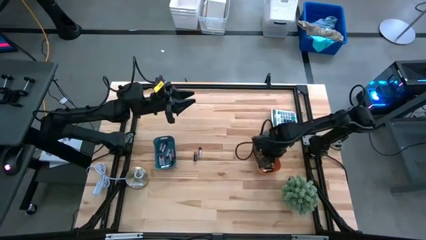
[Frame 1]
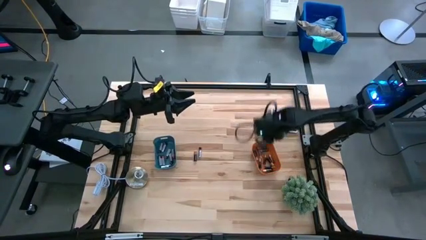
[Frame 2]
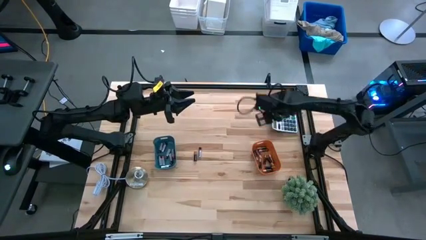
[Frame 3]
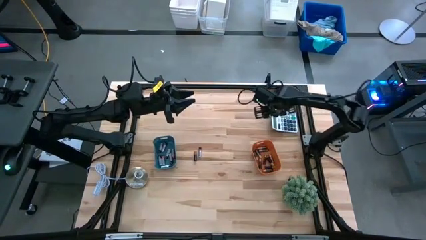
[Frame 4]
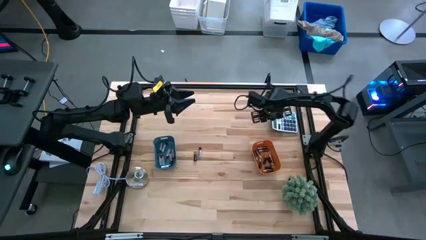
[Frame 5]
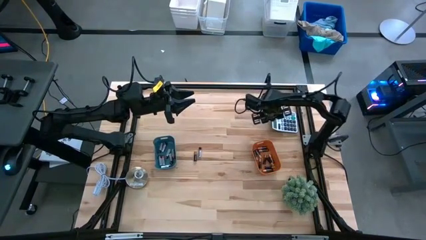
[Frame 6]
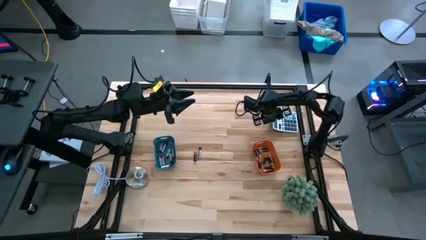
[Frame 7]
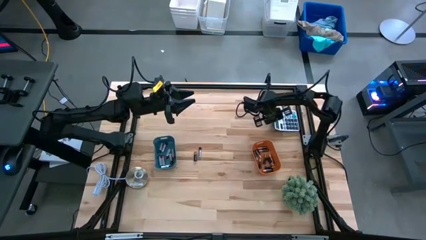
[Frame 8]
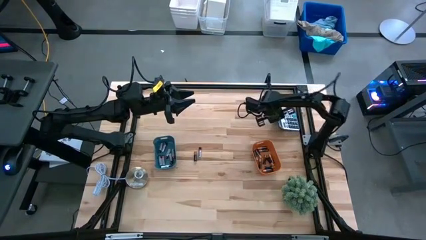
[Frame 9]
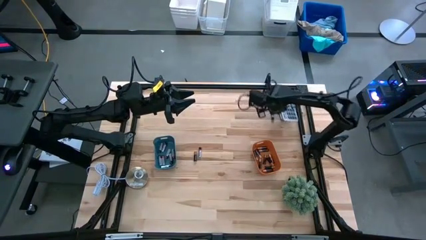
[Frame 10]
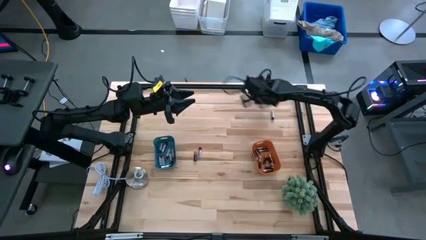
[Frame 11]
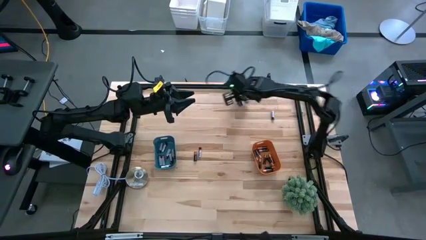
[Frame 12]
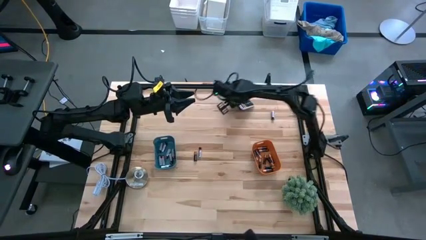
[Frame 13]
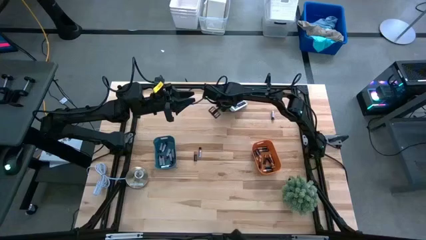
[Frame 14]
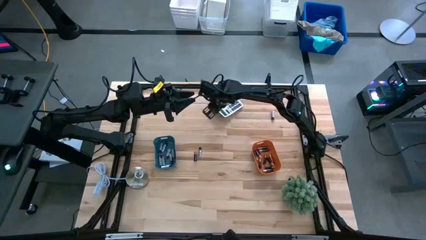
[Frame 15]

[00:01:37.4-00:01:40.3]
Task: Sort batteries
Move the calculator to the top center of the table

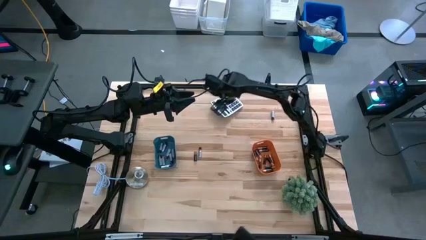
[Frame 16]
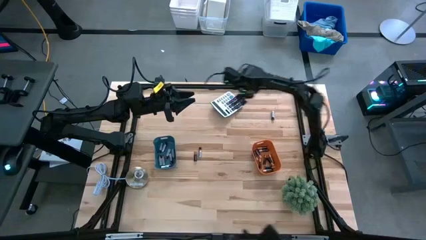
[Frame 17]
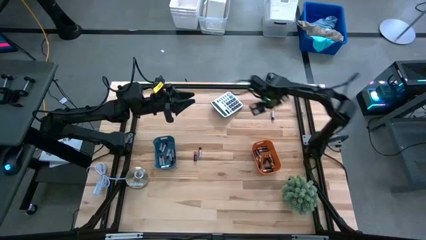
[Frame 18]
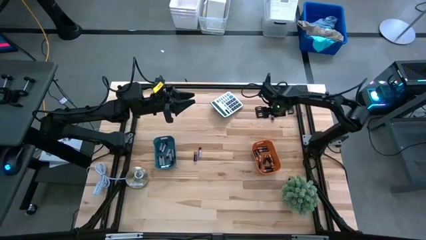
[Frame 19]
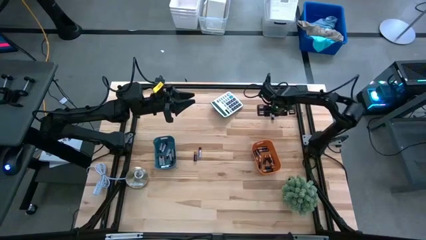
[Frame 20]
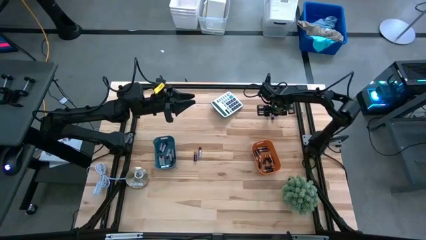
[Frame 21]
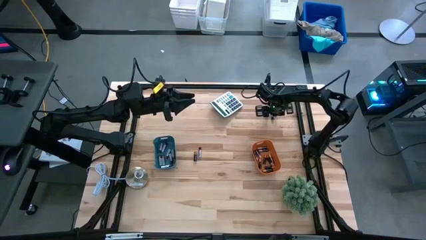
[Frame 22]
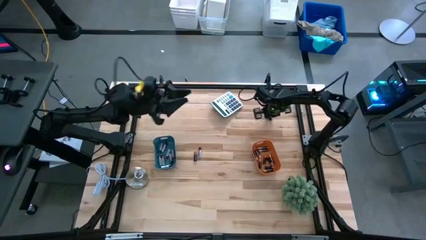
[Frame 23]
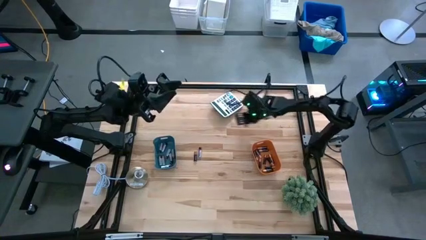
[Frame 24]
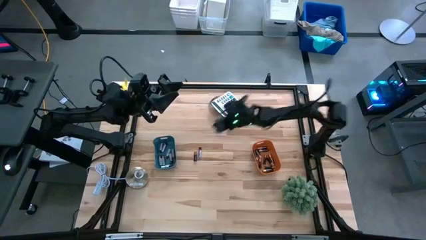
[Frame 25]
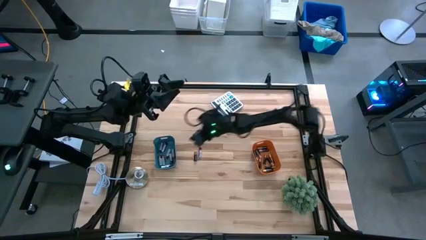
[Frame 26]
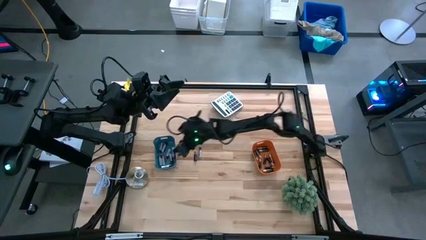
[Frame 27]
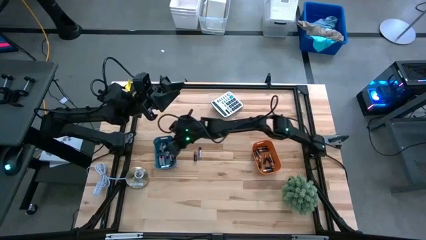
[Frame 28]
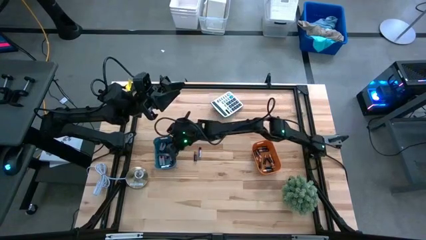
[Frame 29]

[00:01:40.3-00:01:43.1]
Put the silver battery into the blue bin

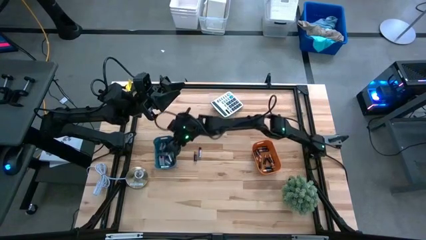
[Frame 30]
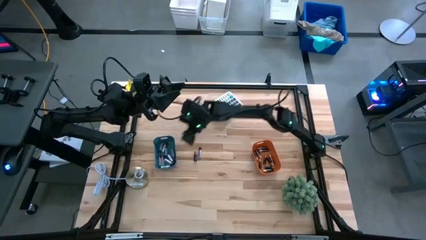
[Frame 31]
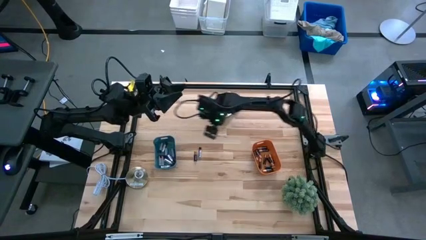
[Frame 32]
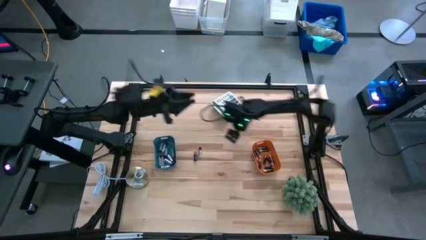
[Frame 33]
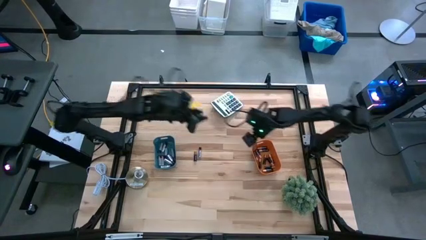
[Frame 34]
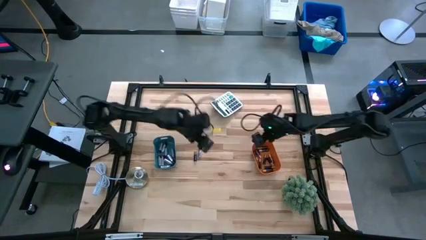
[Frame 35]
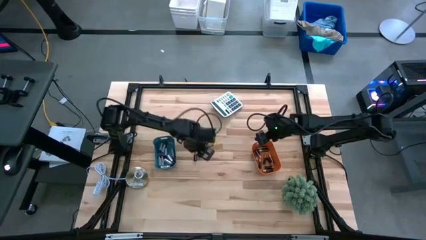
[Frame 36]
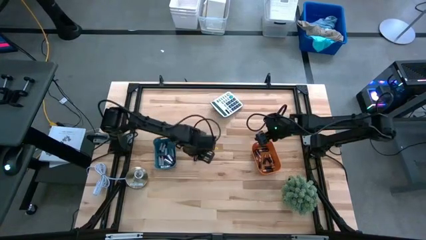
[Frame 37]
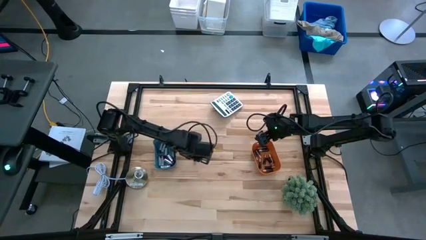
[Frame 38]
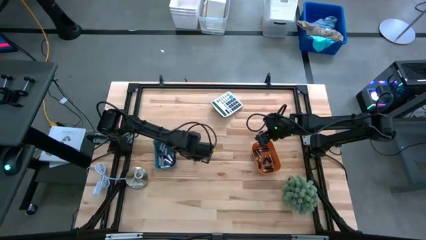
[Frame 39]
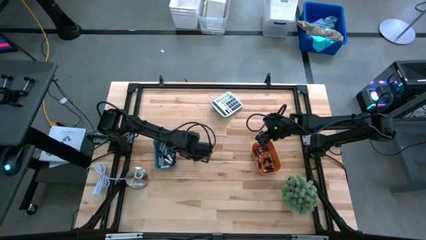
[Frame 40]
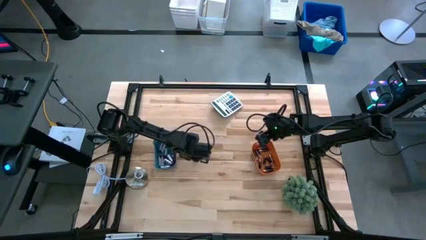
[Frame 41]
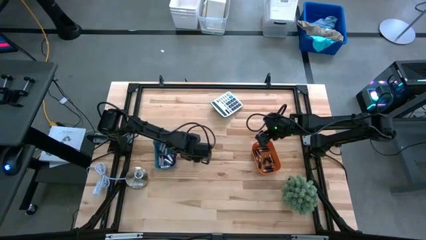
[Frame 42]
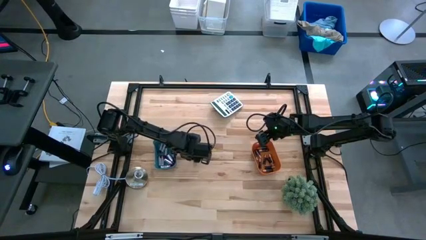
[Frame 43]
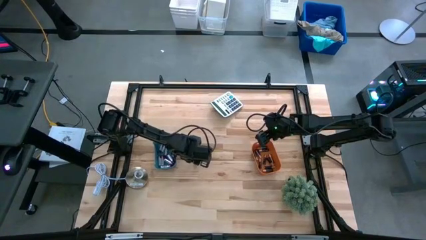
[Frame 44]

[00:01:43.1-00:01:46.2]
Put the black battery into the orange bin

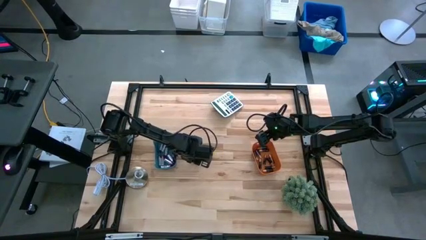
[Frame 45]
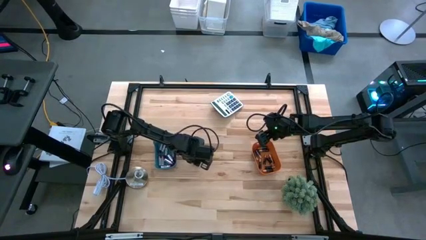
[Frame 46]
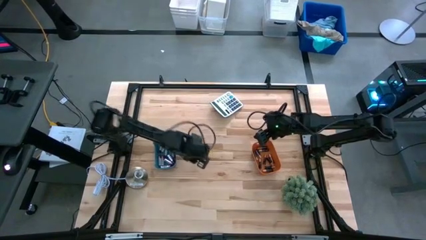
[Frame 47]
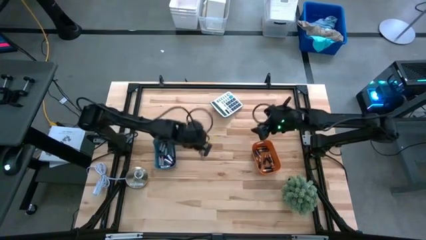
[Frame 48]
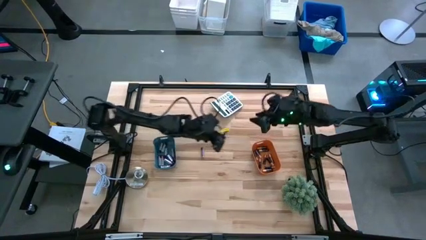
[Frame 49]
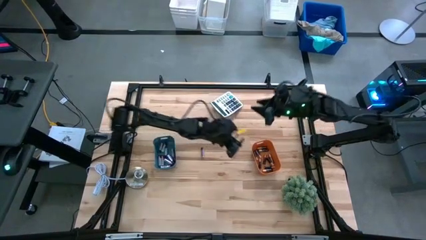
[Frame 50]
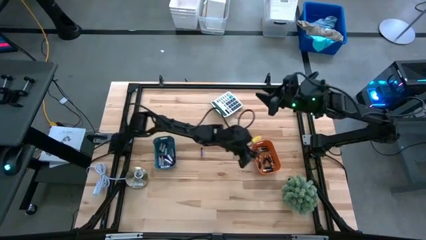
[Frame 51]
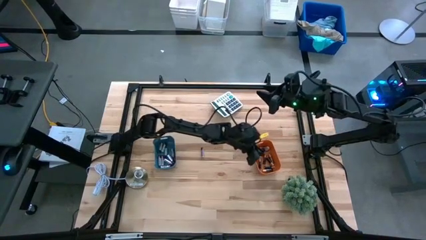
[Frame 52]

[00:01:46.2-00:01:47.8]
Put the black battery into the orange bin

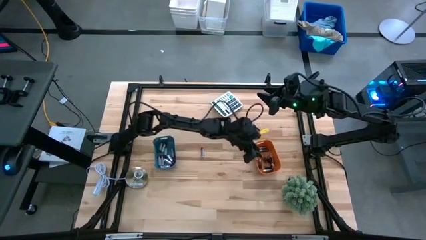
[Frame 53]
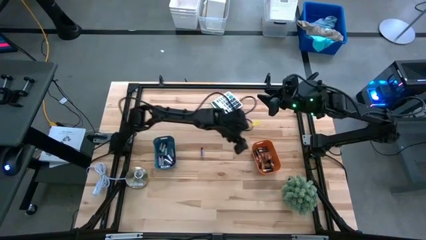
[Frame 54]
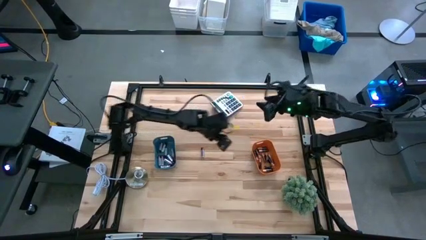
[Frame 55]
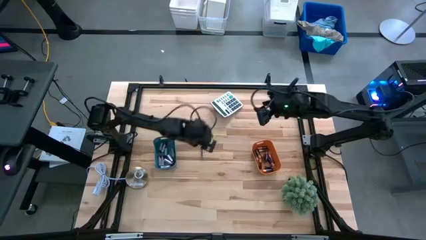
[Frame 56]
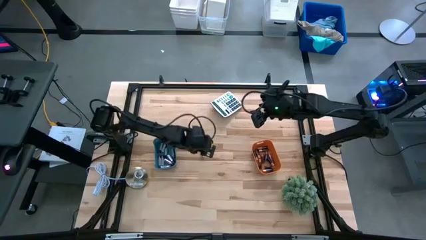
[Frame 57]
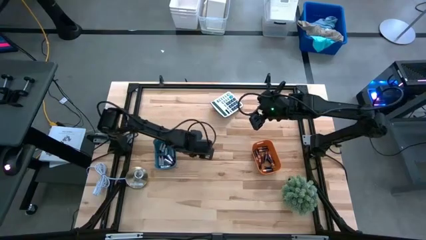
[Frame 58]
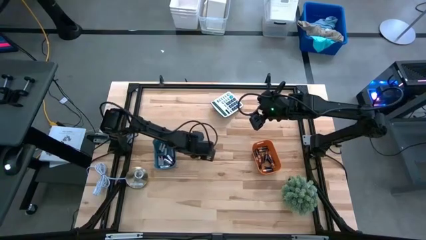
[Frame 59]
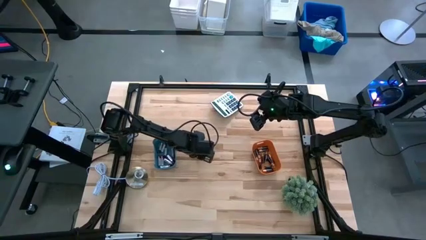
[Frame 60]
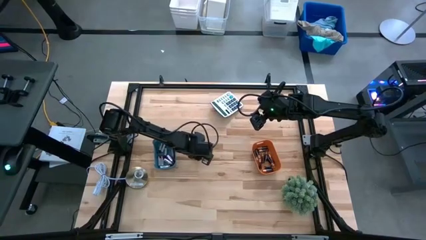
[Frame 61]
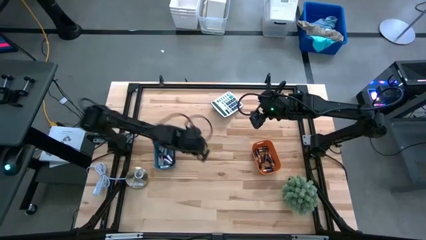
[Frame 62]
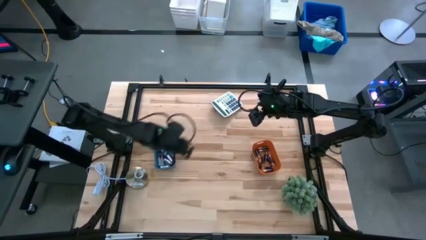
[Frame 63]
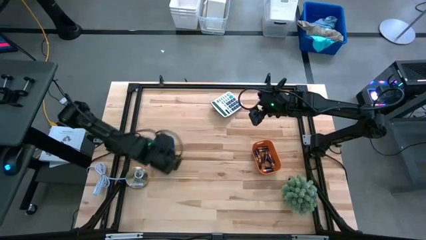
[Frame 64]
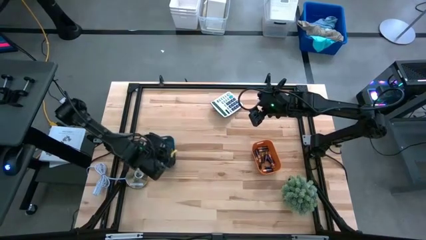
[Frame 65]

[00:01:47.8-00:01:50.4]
Put the silver battery into the blue bin
